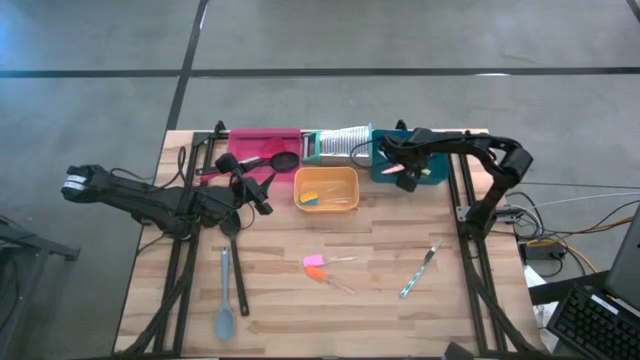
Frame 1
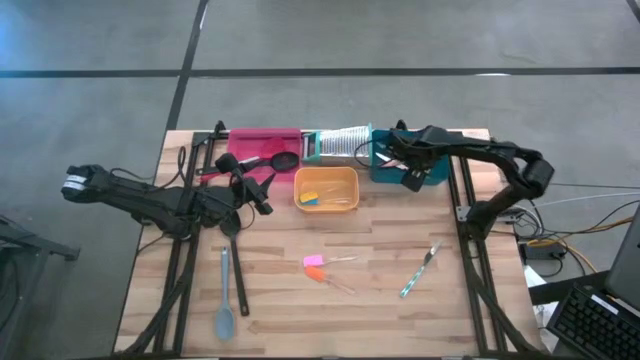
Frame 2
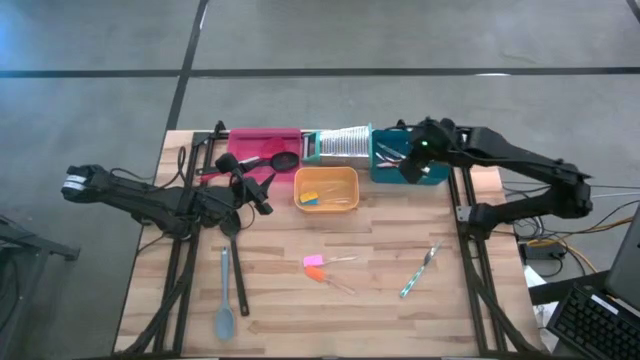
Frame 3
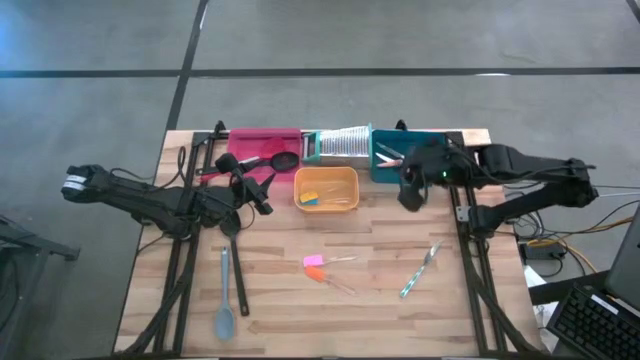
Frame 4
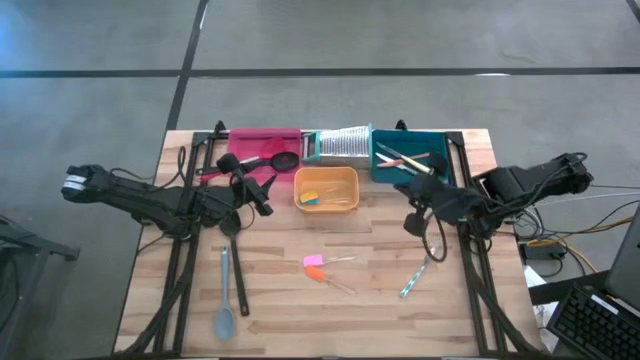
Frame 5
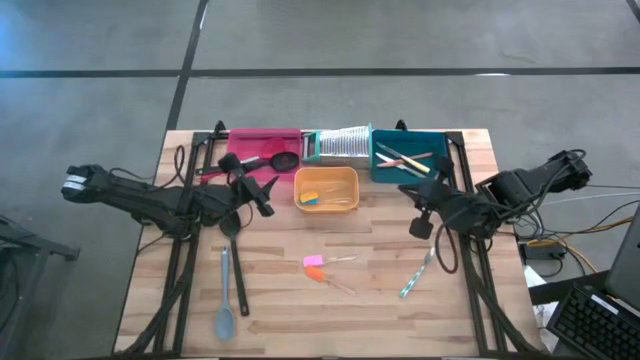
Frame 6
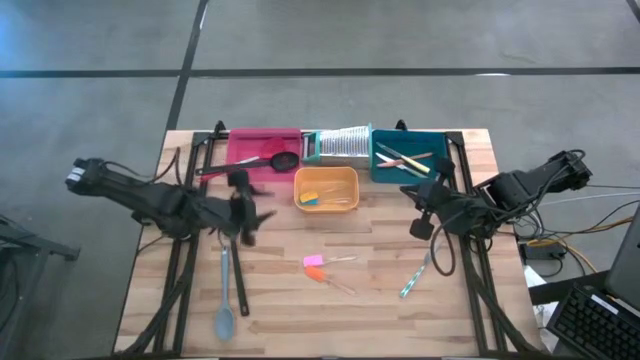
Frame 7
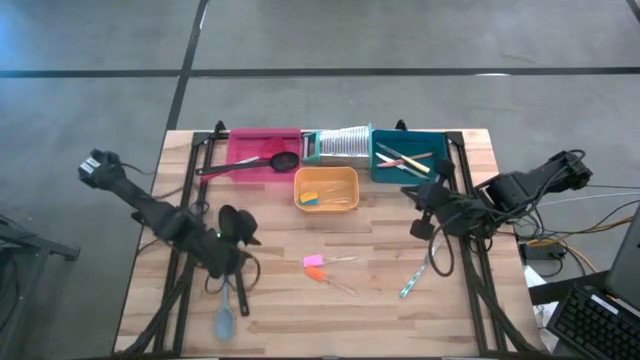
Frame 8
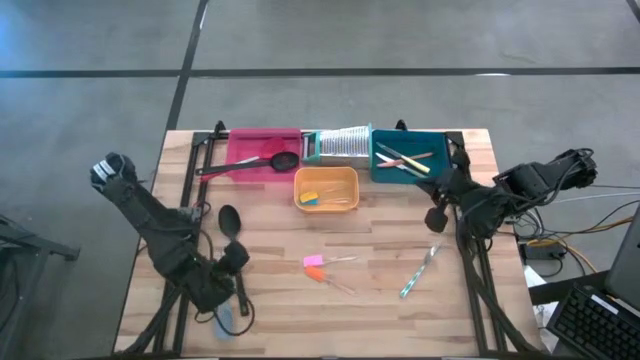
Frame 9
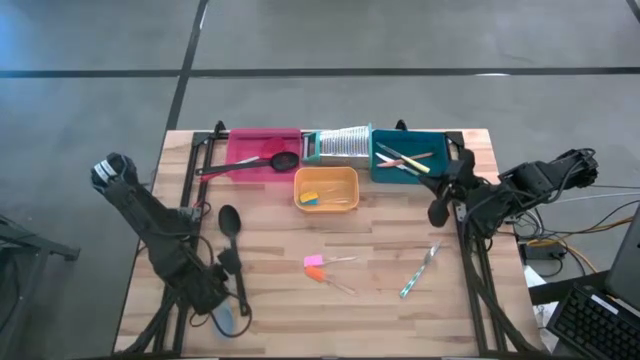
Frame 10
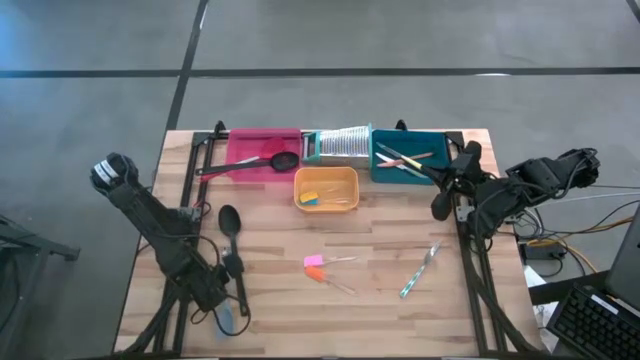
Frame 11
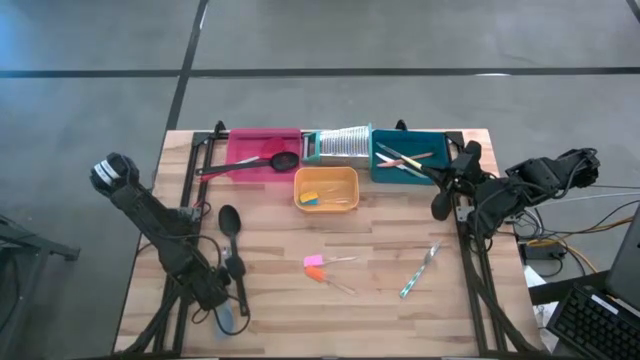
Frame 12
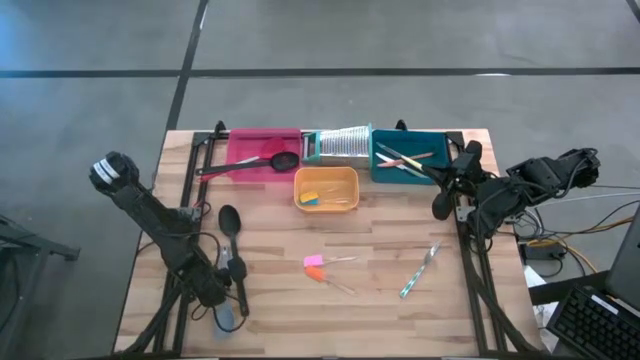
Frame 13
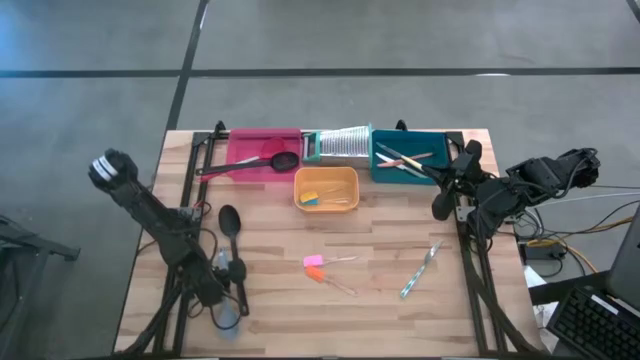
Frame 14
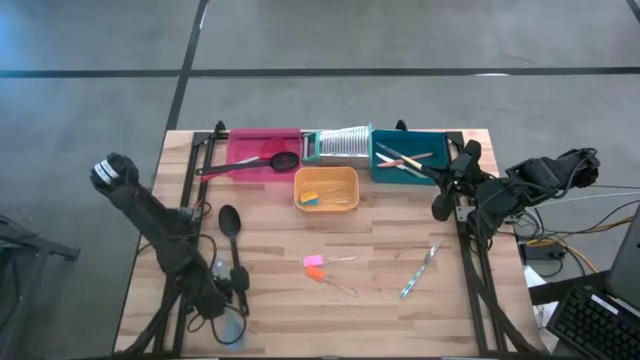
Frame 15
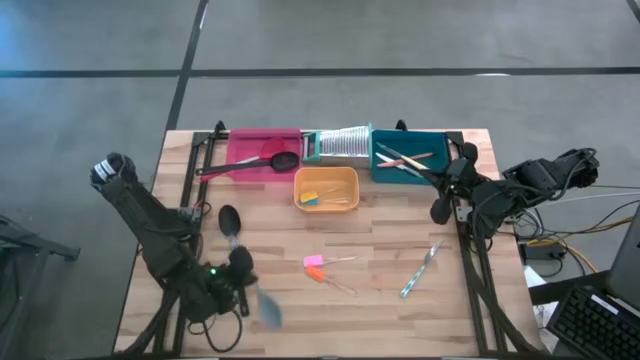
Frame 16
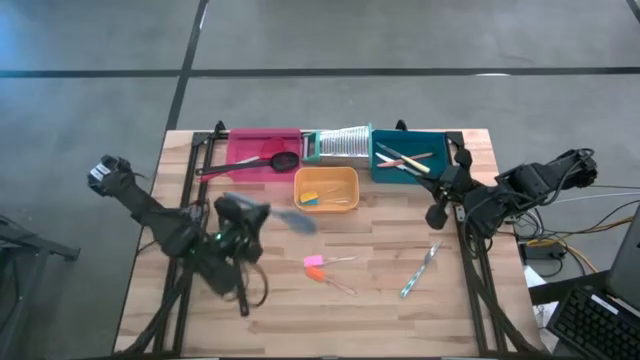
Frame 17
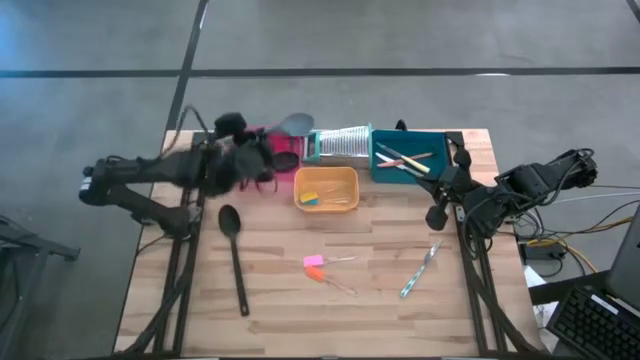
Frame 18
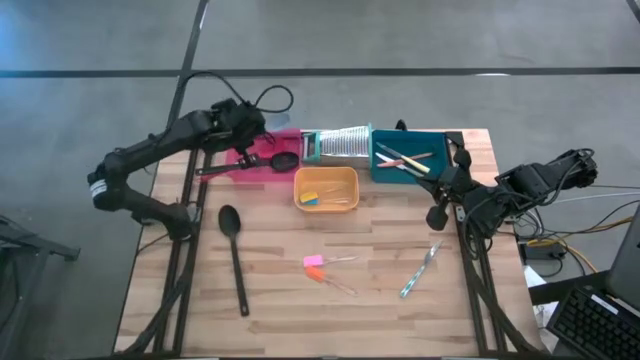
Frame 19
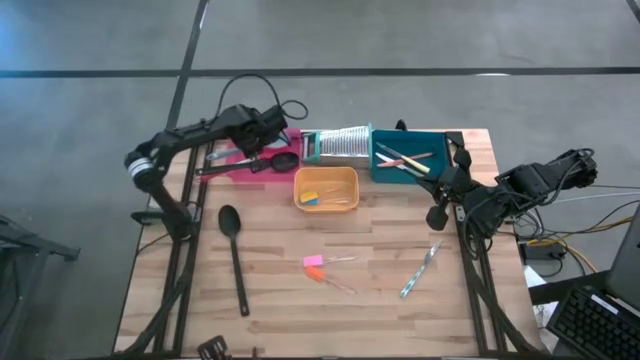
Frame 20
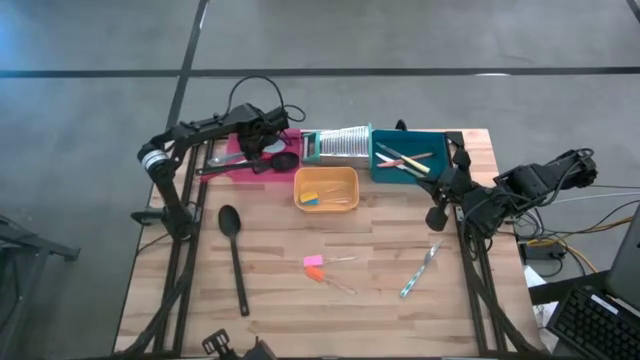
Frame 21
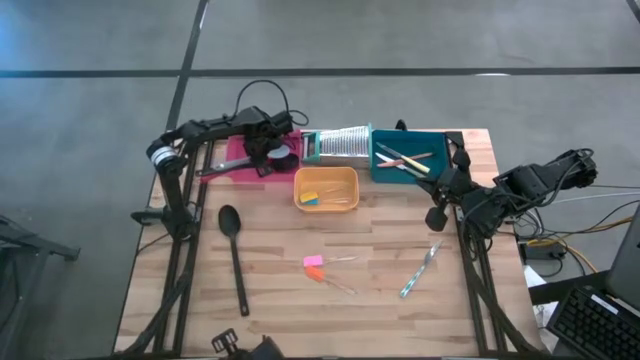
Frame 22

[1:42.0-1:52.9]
Task: Pick & Place Kitchen Items
Put the gray spoon into the pink bin

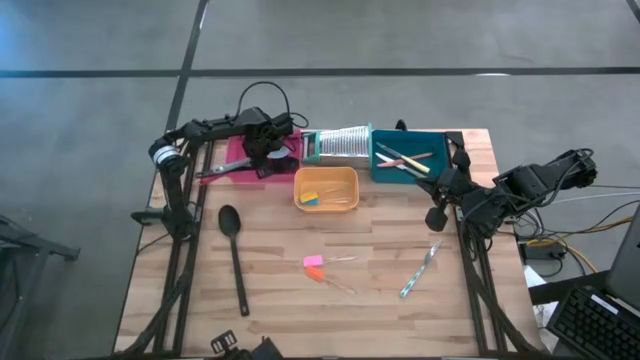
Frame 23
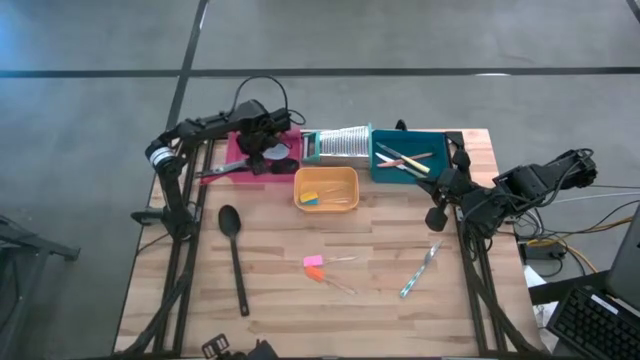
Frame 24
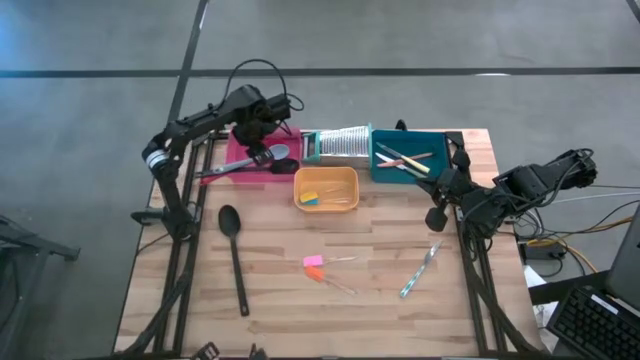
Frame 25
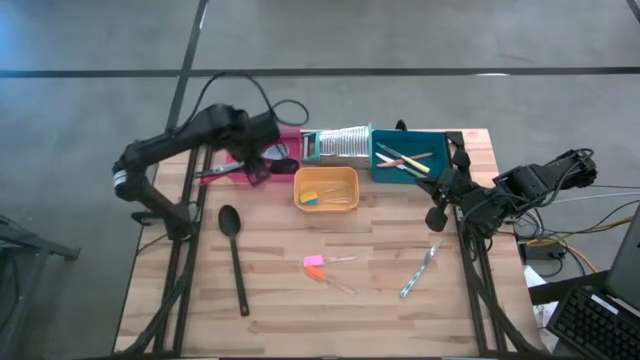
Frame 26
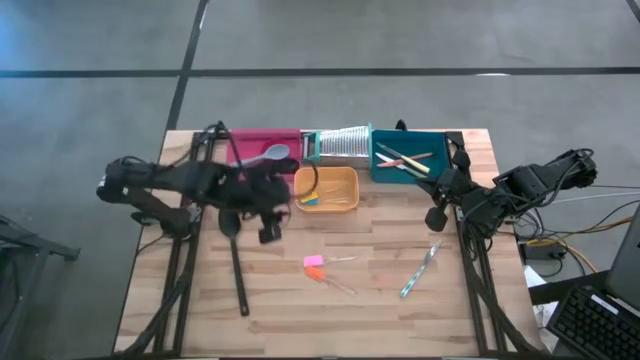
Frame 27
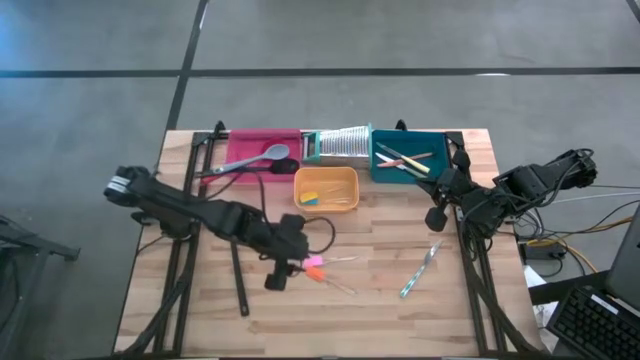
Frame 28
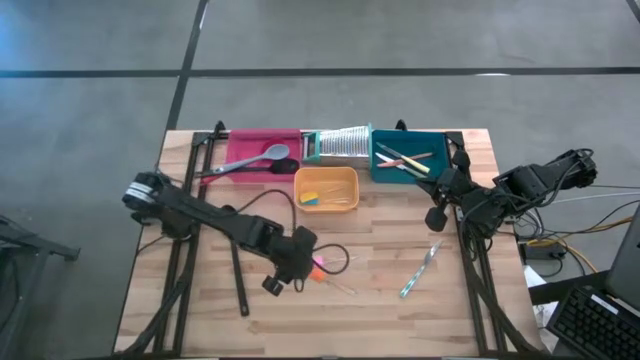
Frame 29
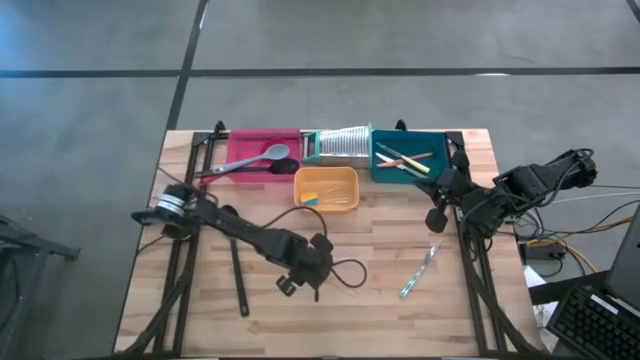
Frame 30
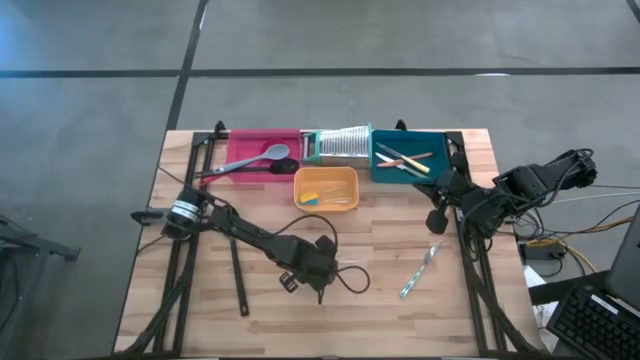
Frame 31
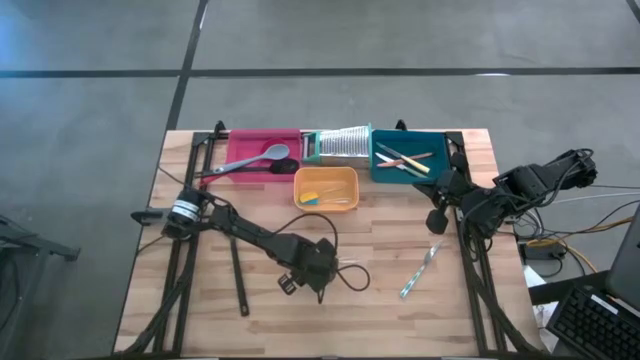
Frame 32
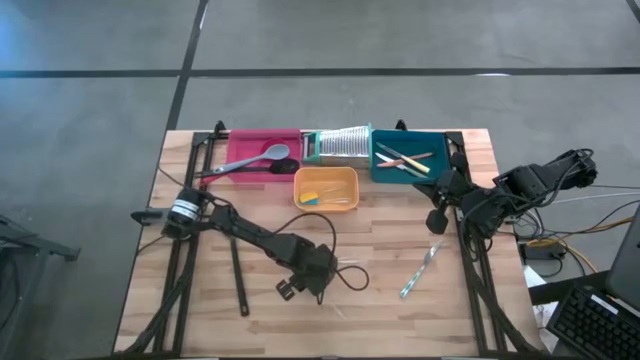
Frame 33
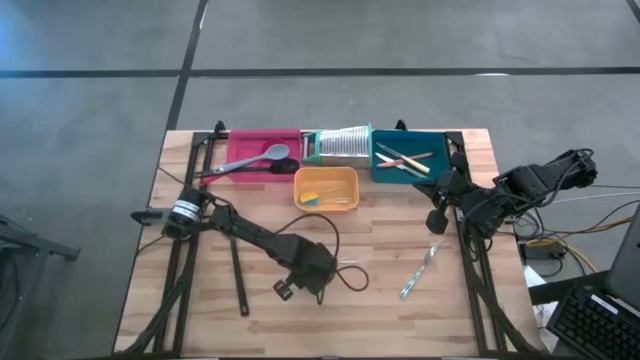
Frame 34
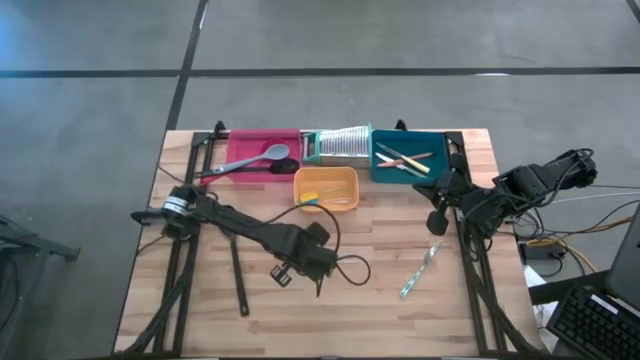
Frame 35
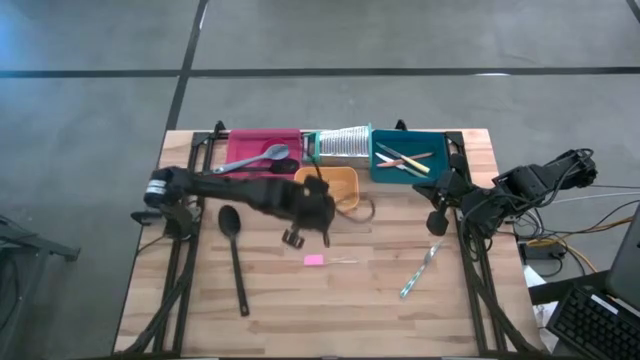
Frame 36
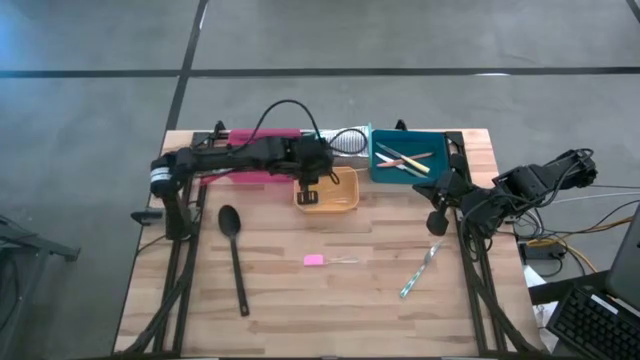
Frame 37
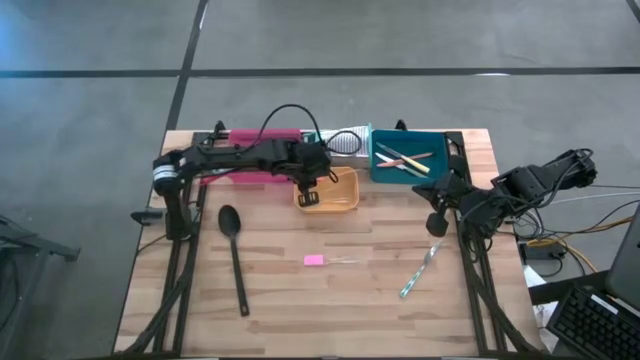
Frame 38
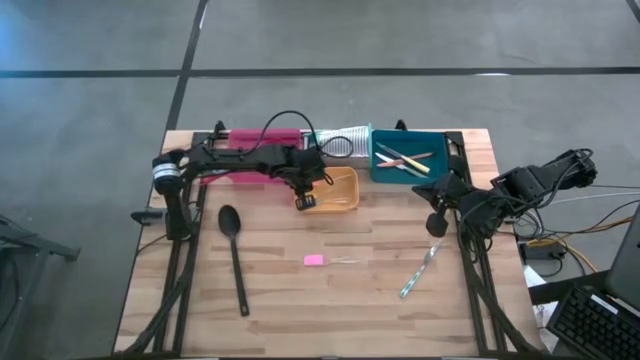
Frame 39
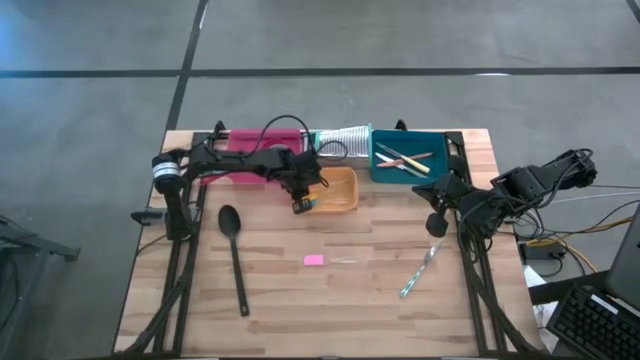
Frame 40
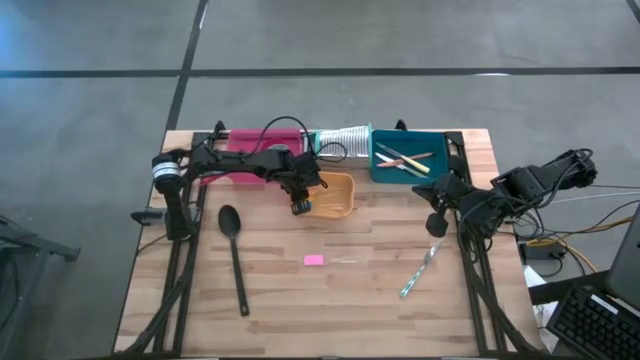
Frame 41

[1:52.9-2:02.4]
Put the orange spatula into the yellow bin
